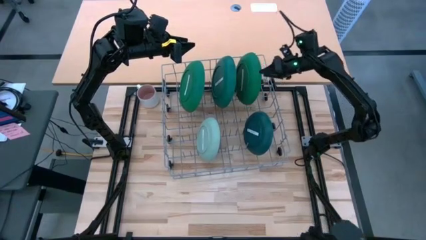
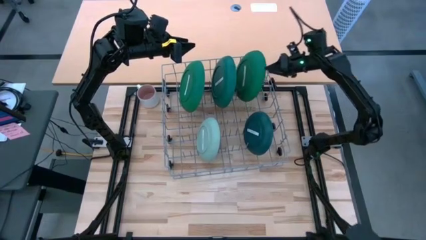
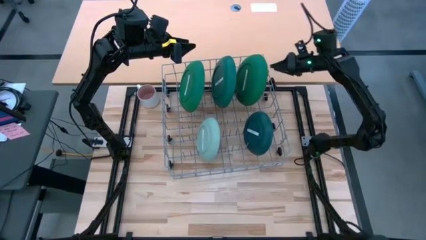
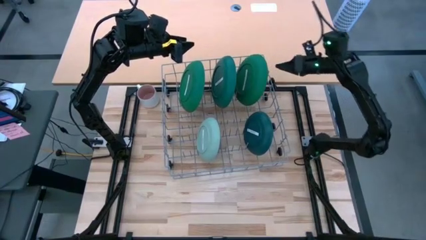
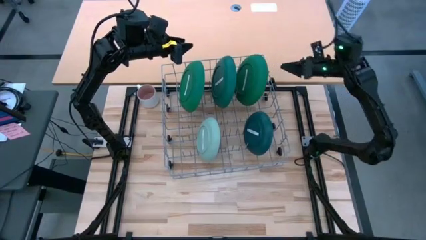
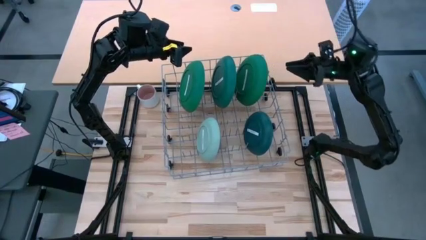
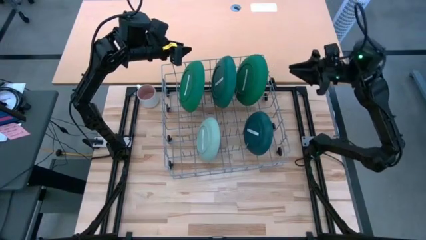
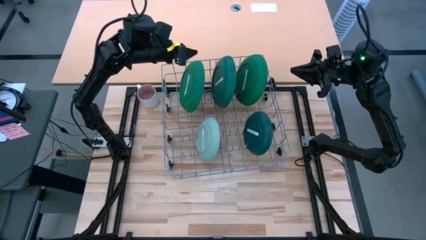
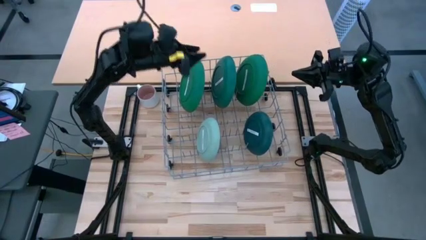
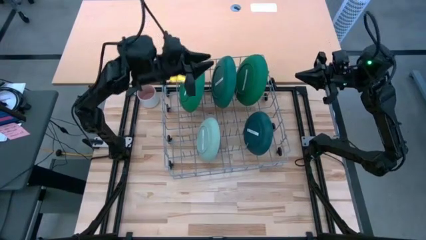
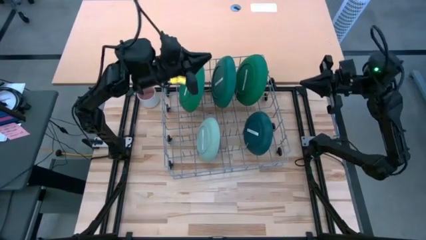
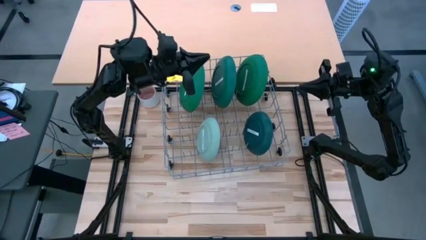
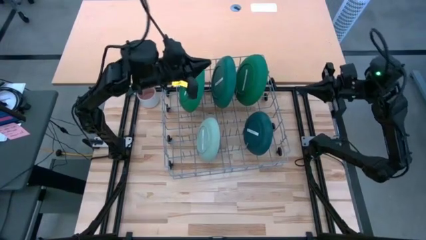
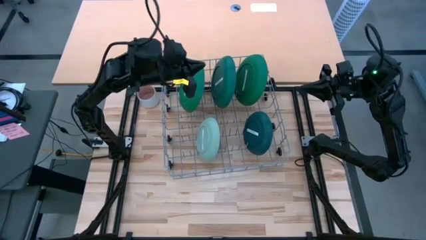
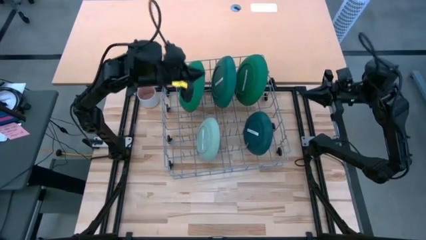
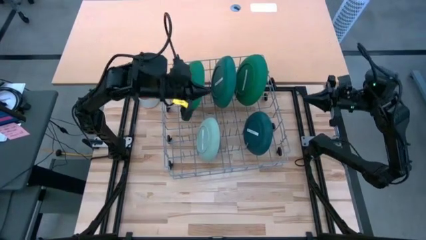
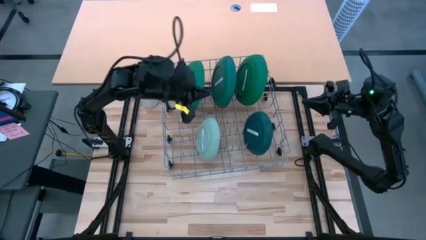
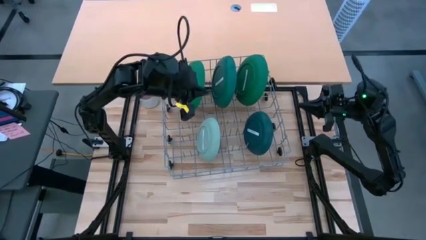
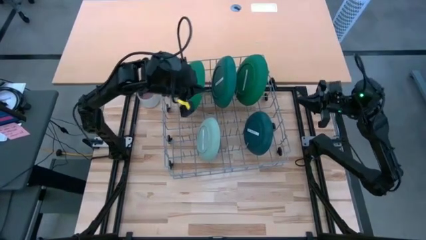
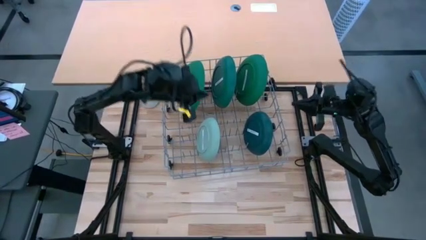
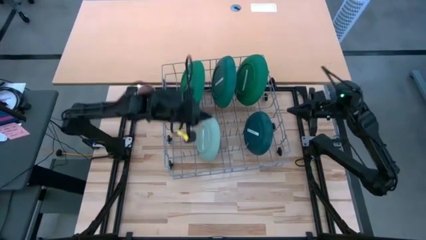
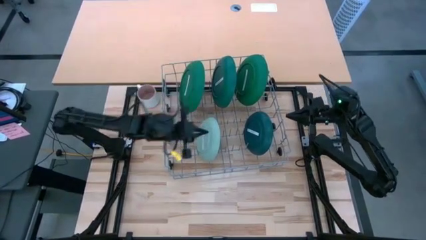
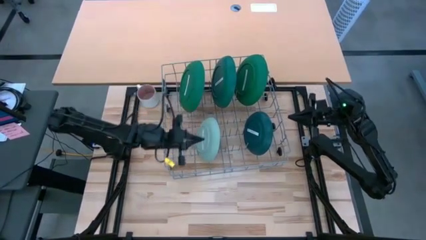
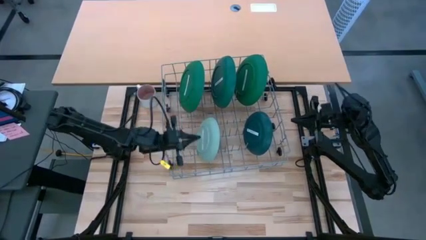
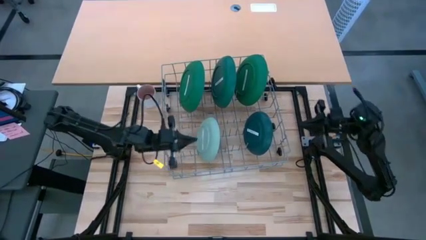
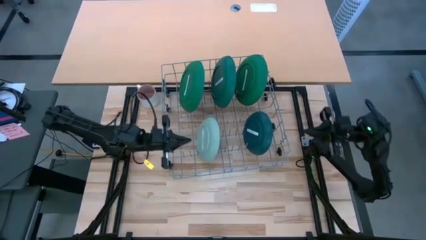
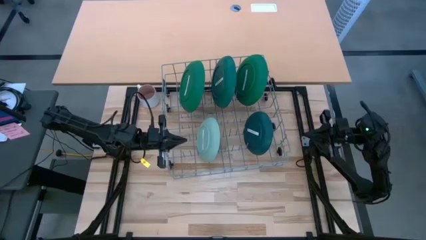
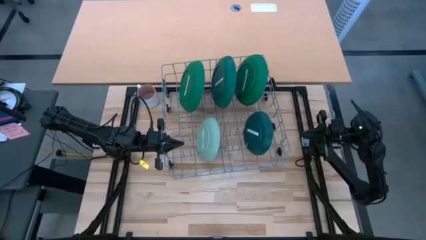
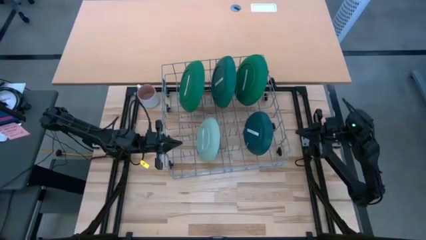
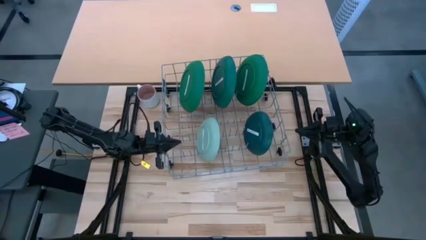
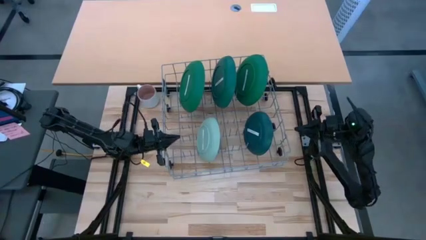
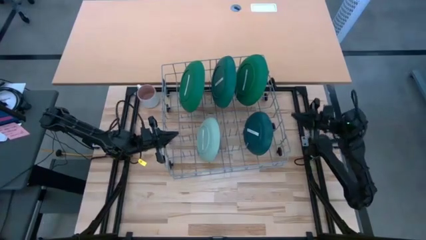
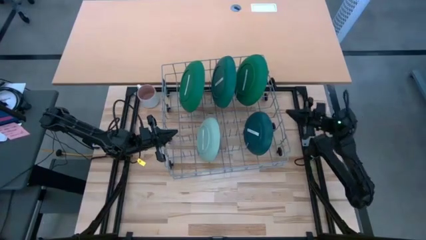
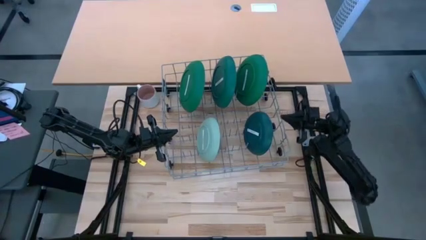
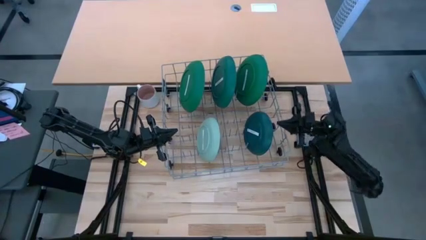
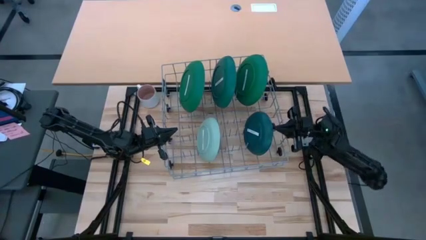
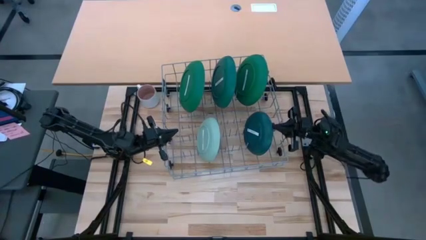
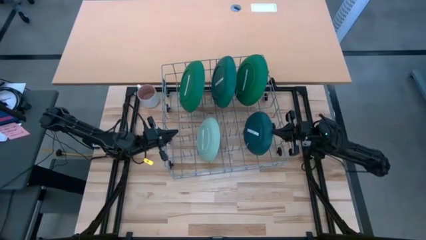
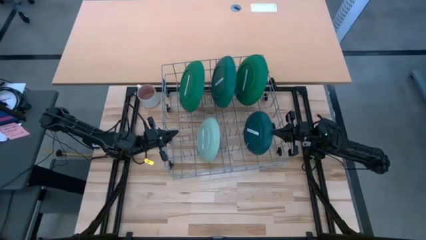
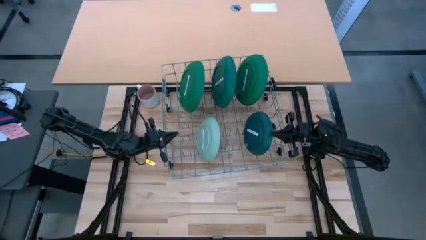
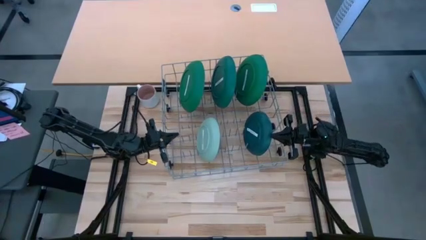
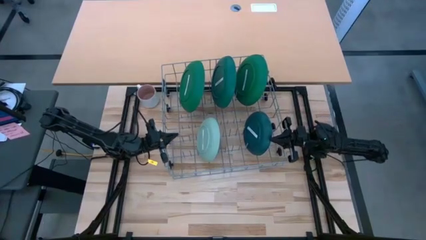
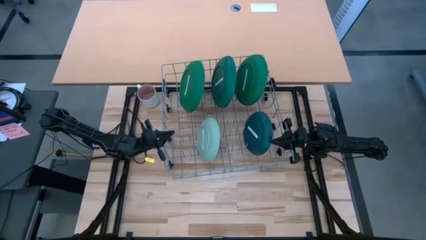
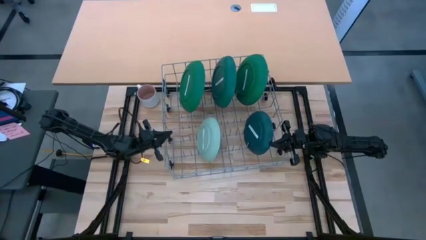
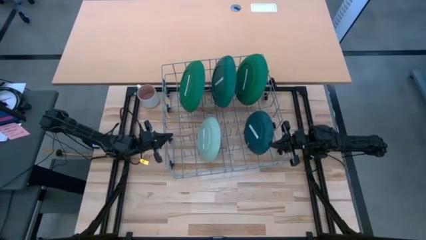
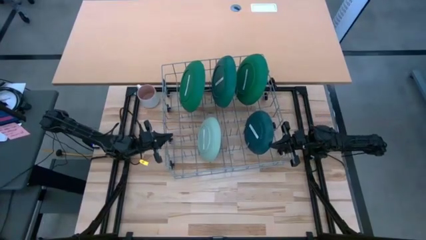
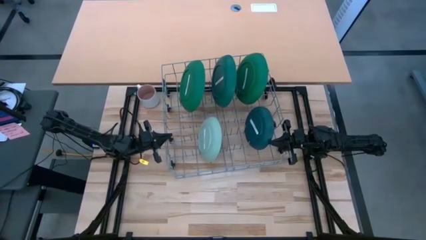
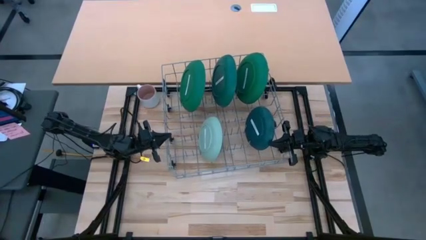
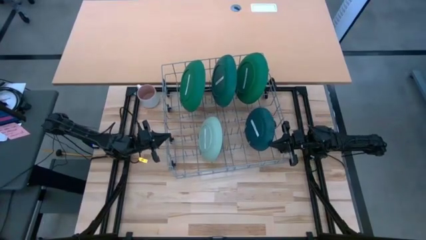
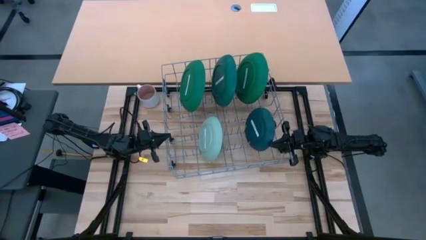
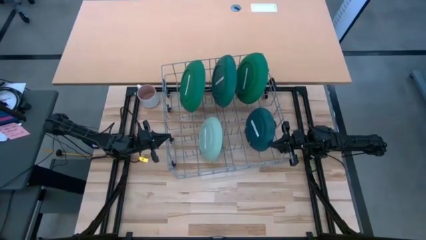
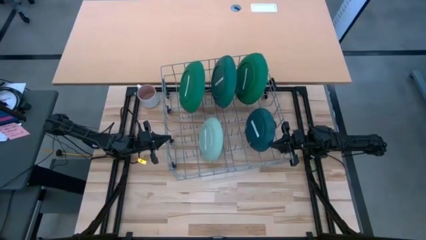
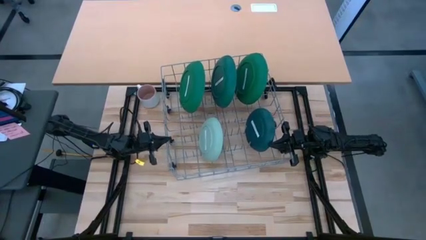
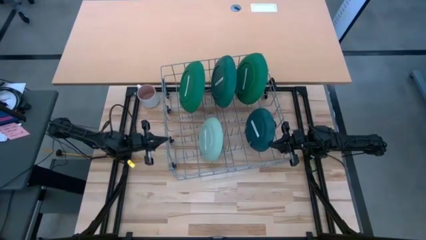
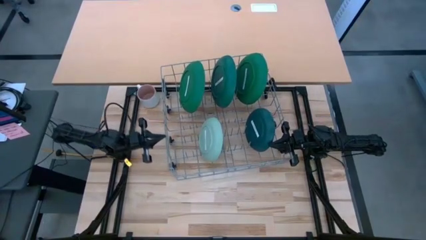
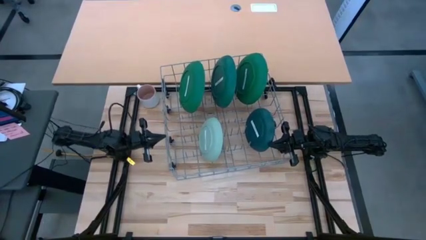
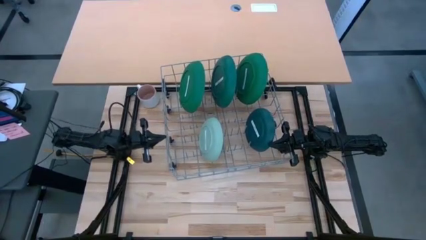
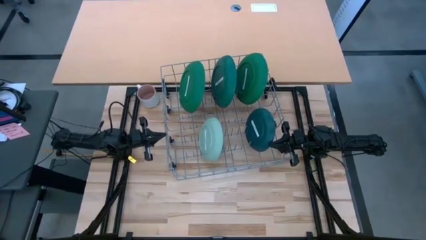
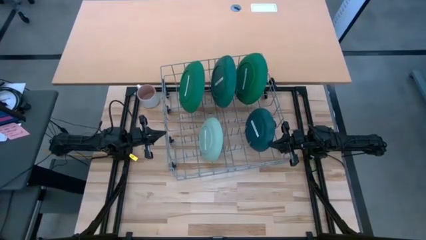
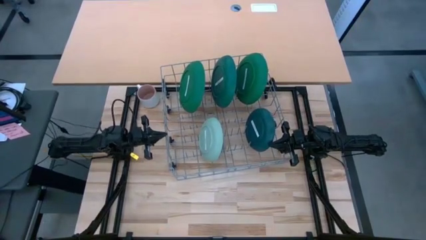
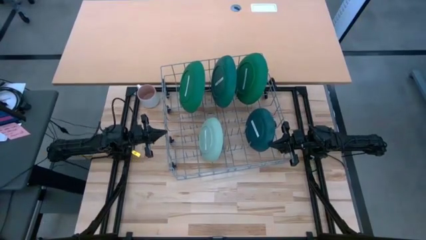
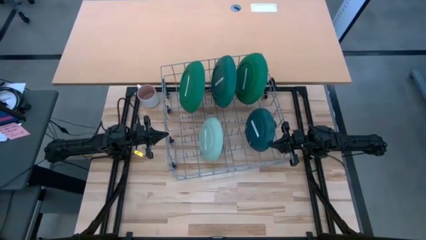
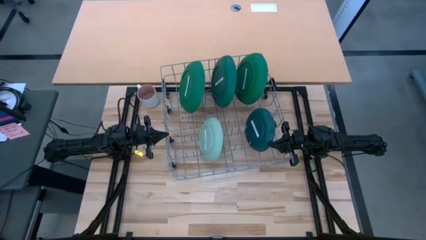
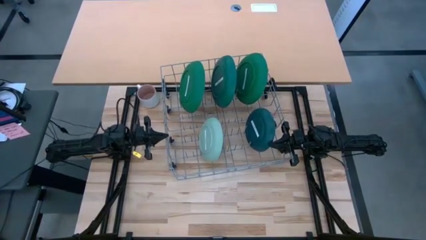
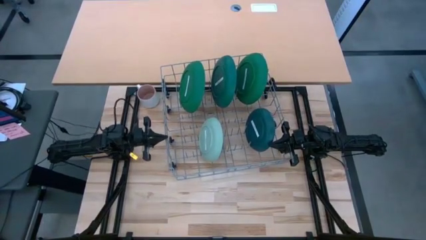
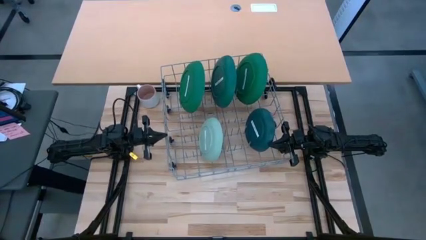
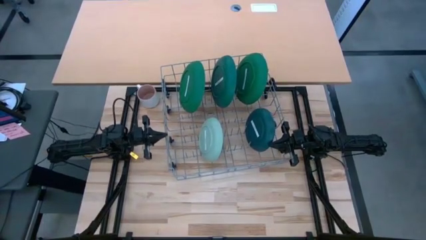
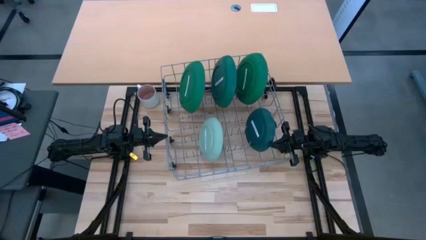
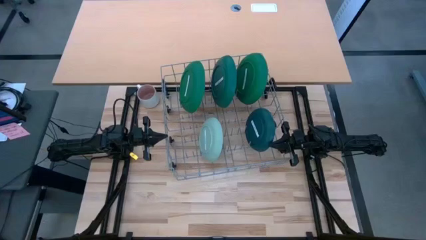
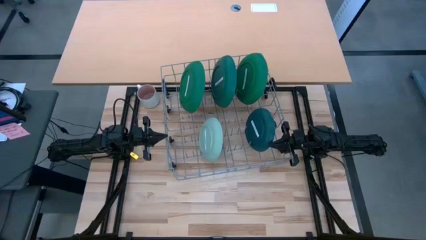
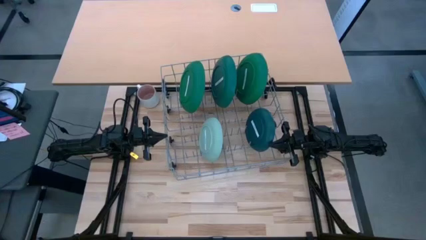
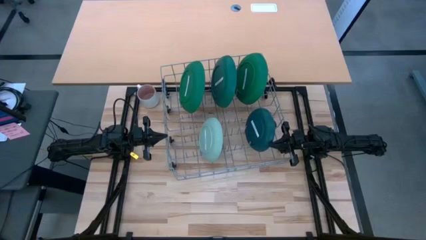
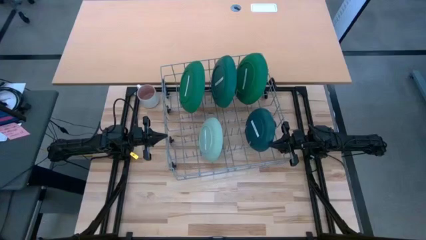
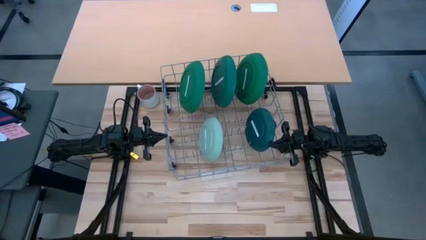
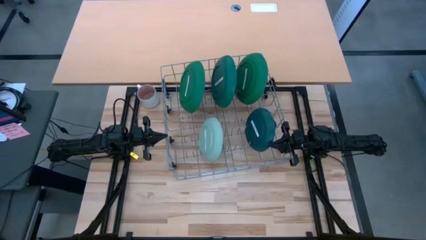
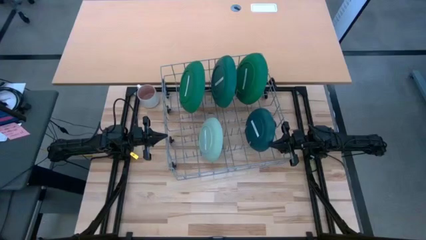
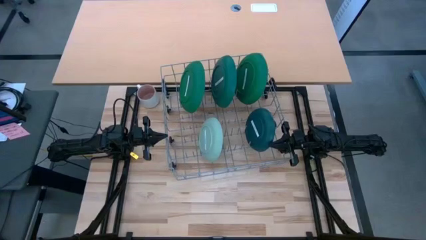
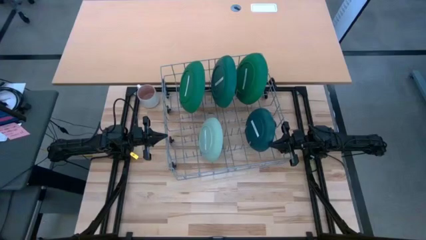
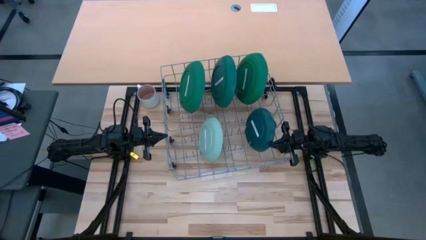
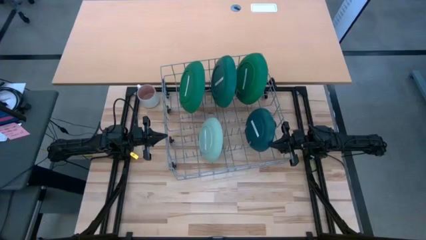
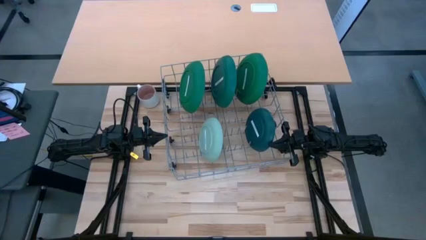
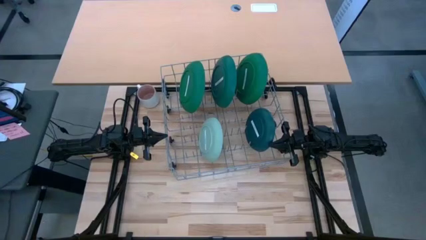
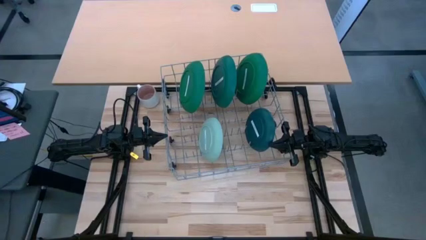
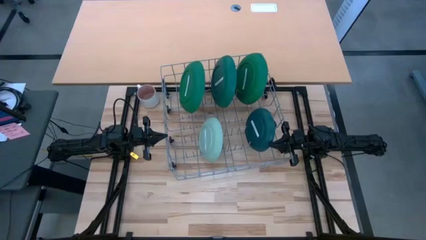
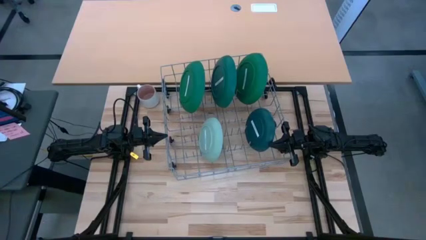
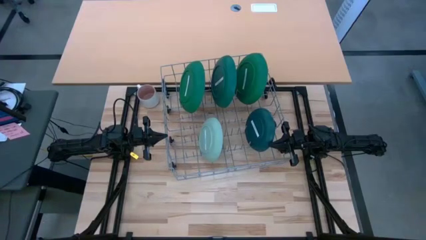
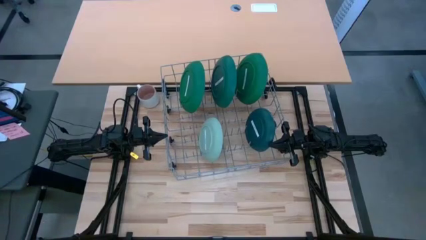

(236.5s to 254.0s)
Task: Sort dishes
Return to Home Position
